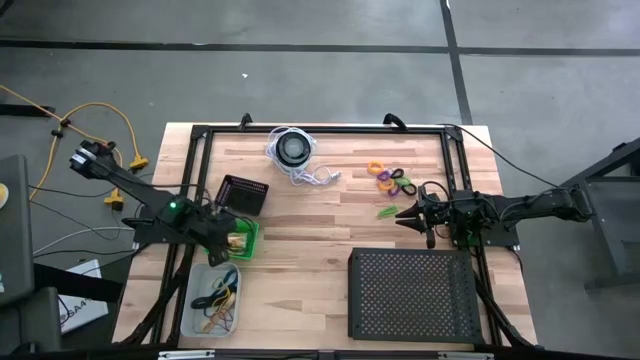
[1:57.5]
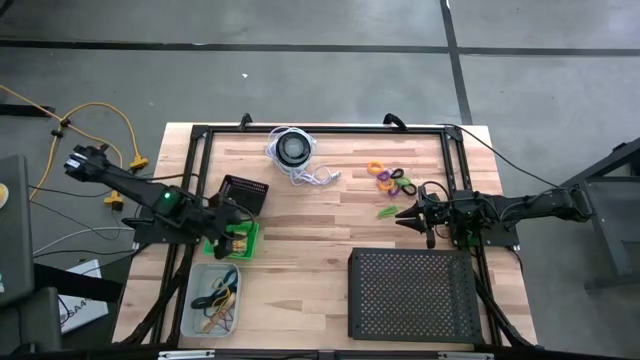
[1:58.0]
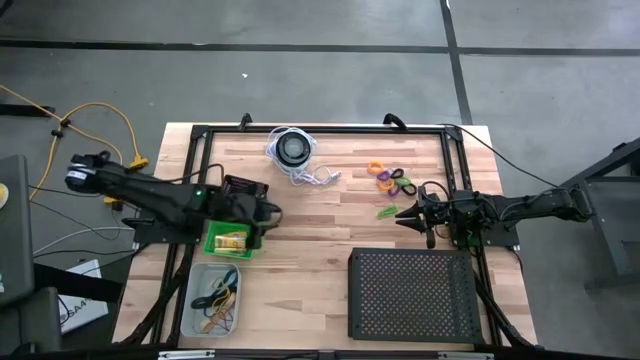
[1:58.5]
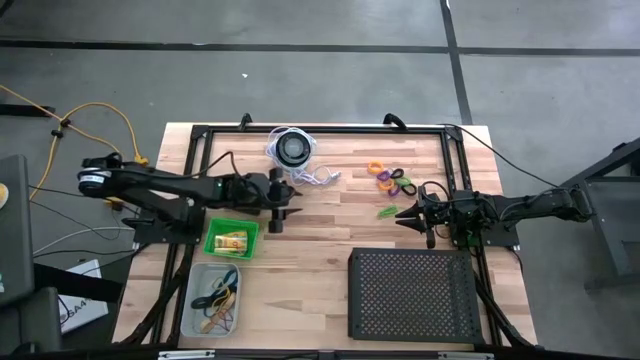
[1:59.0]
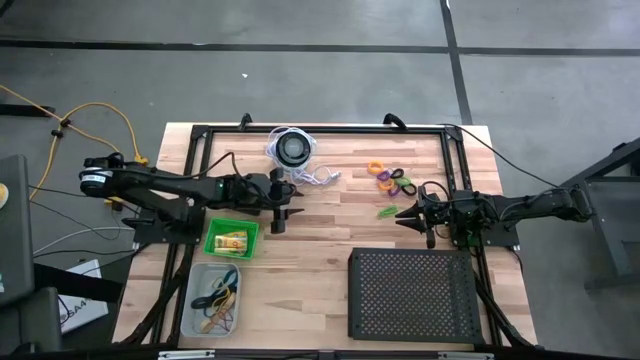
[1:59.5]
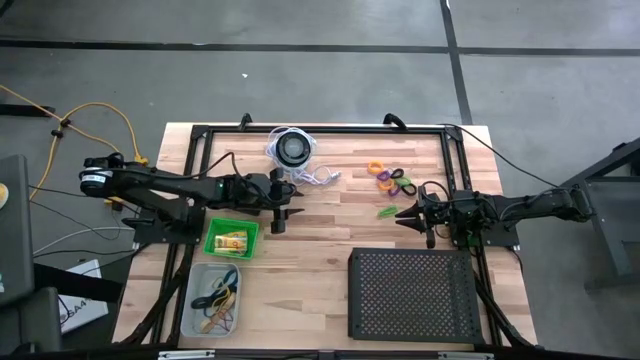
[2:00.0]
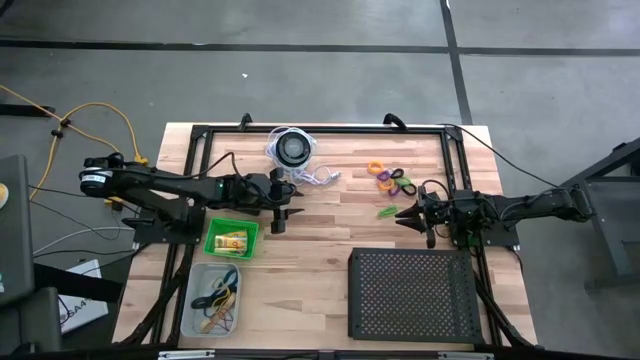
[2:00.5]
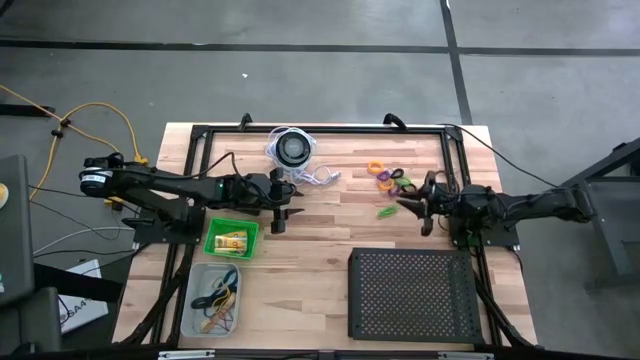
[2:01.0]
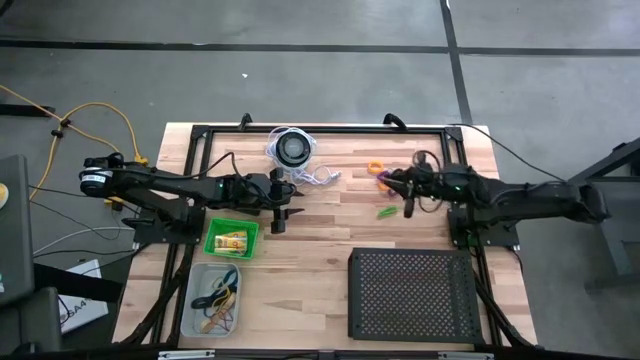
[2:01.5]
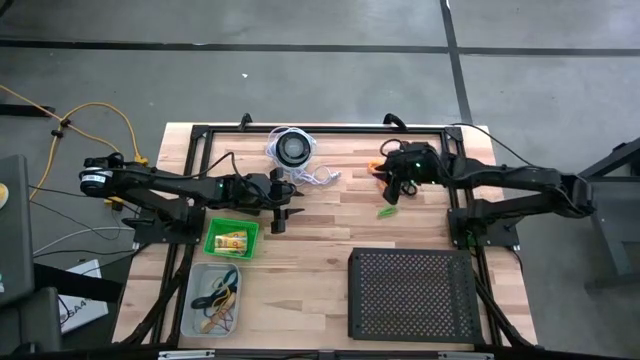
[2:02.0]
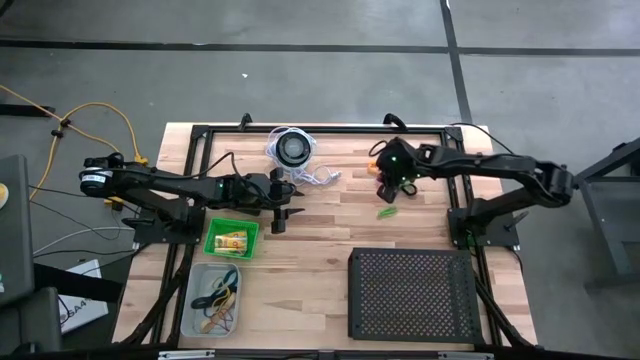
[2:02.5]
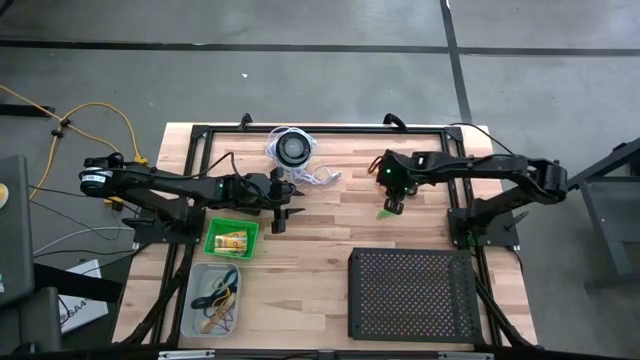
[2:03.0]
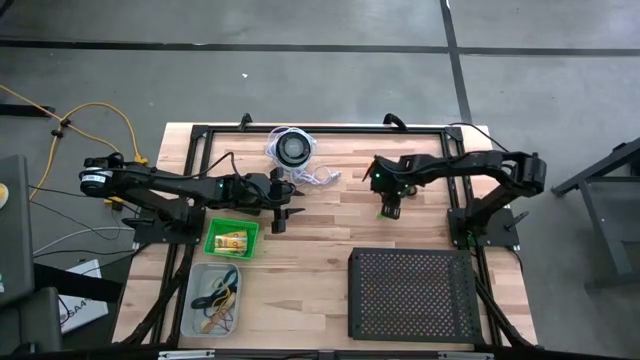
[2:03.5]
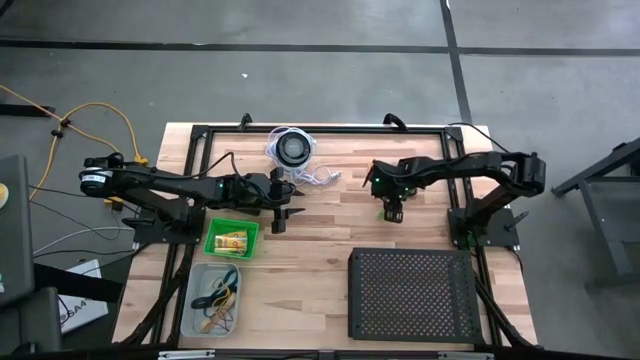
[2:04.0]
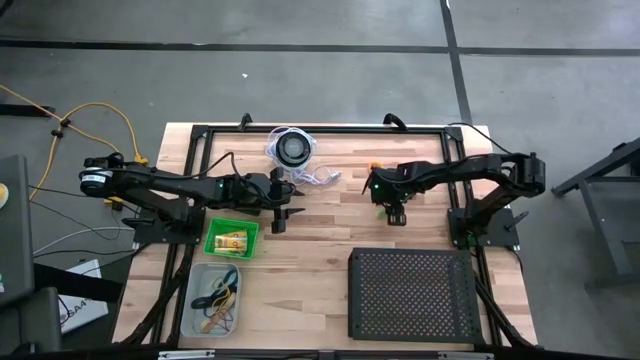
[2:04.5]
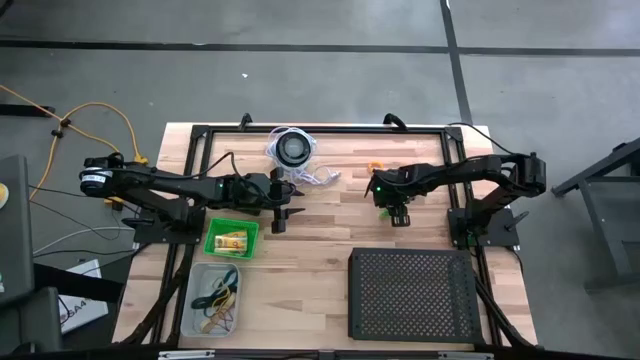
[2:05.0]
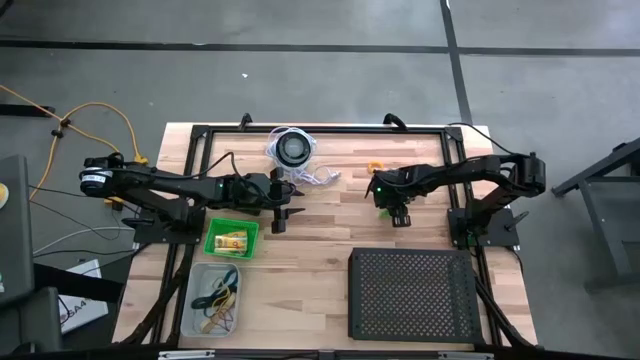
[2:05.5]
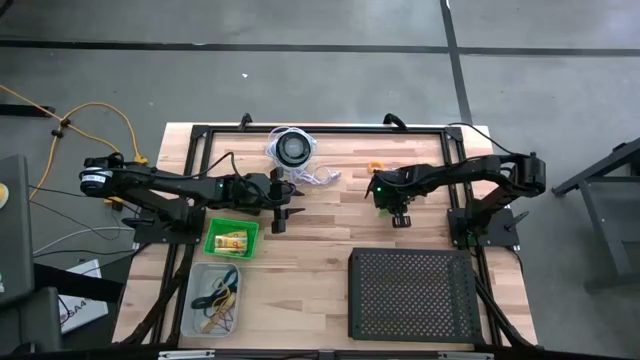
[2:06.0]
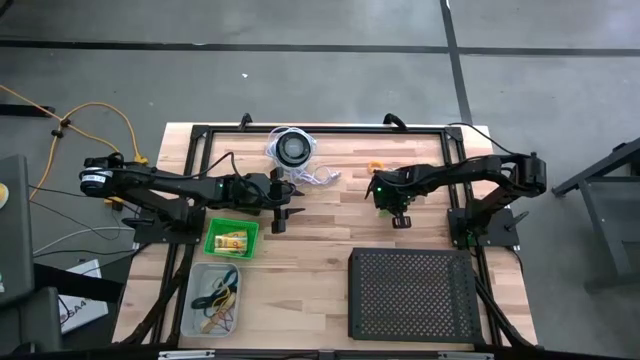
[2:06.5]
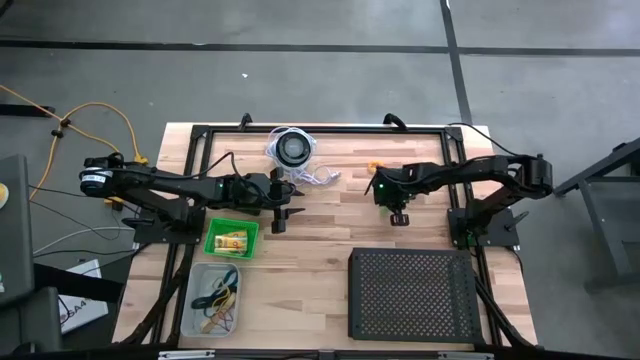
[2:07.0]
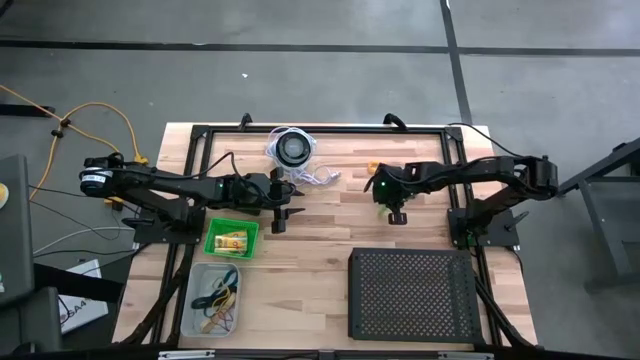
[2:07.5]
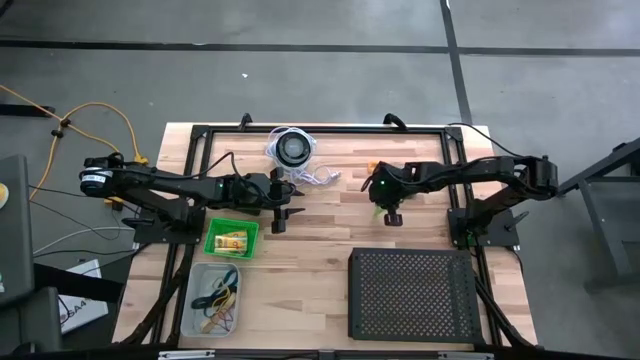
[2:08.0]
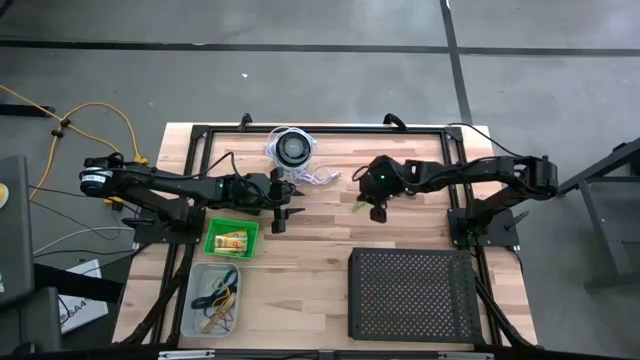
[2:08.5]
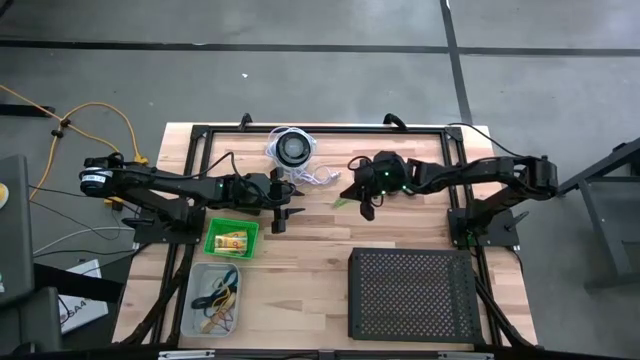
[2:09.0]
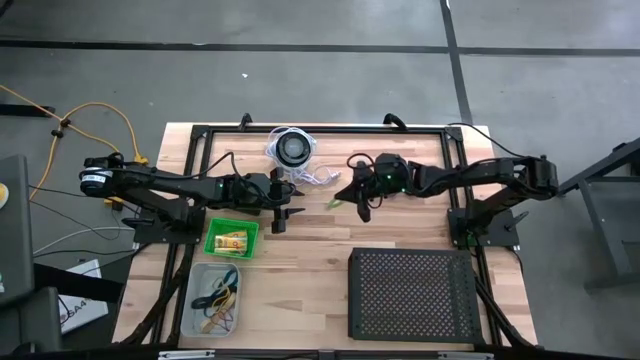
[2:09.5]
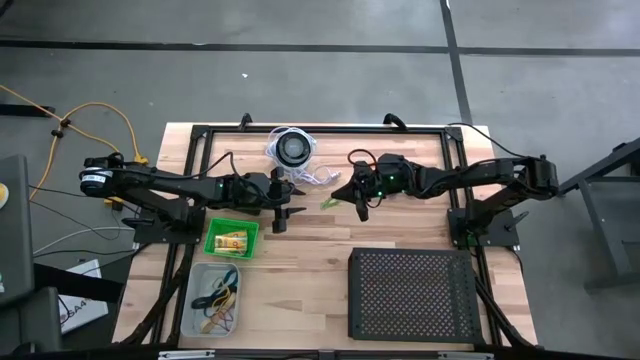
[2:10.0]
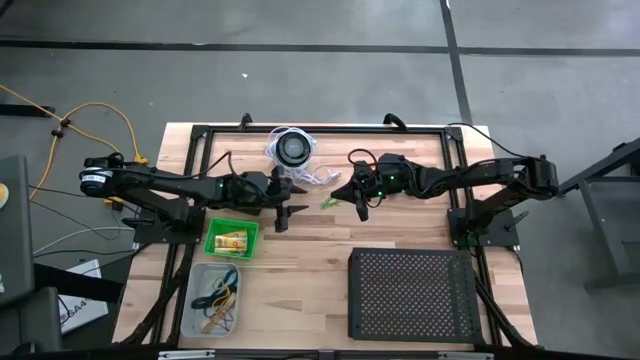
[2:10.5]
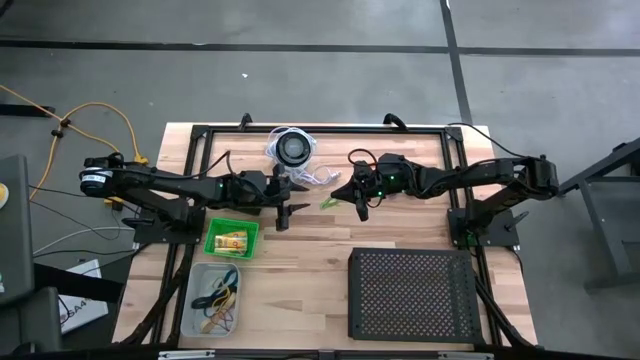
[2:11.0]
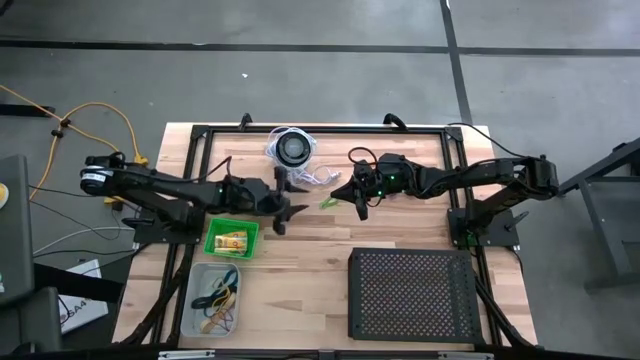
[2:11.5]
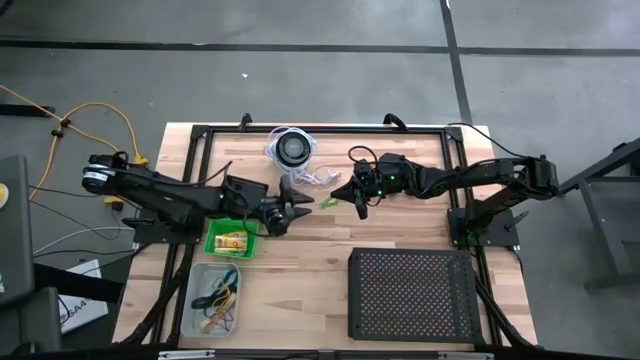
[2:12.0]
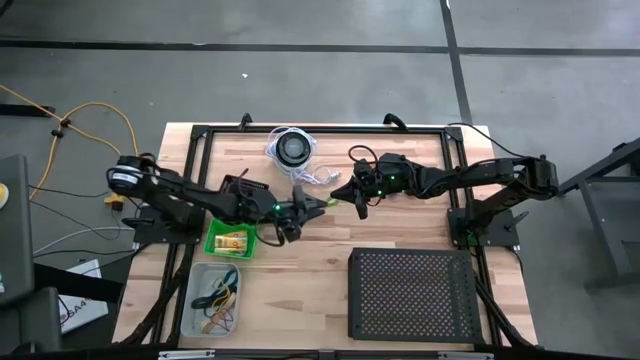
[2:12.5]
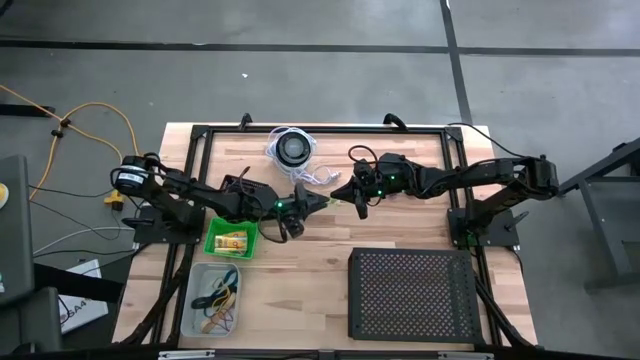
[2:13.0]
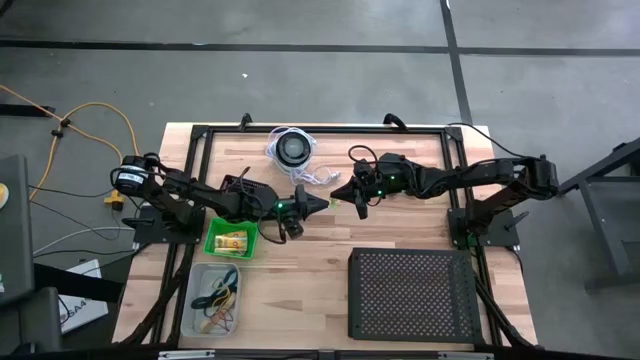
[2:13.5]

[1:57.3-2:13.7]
Task: Pick & Place Office Desk Supplies
Put the green coil keychain into the black bin

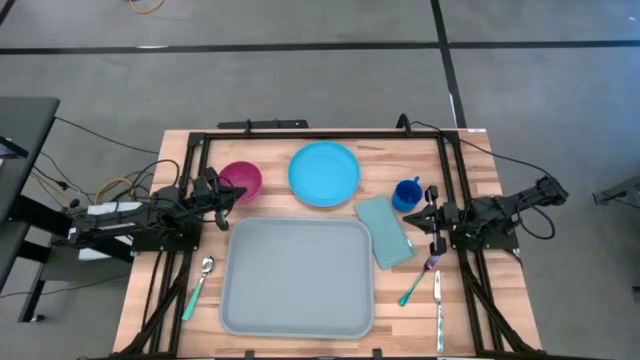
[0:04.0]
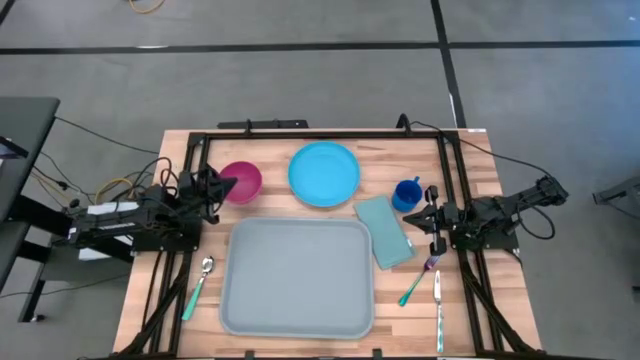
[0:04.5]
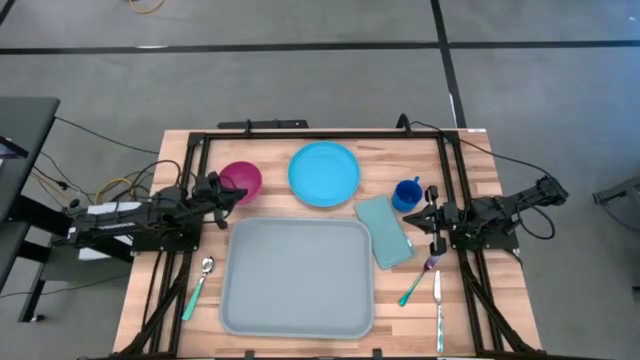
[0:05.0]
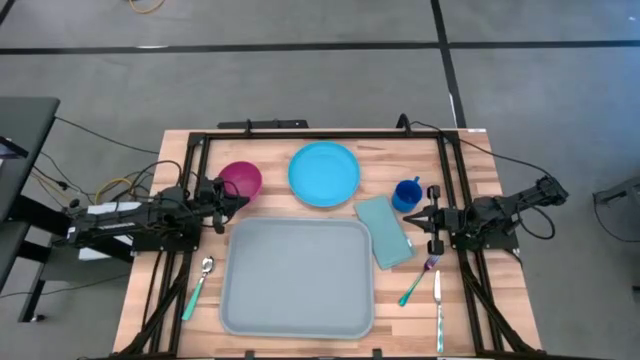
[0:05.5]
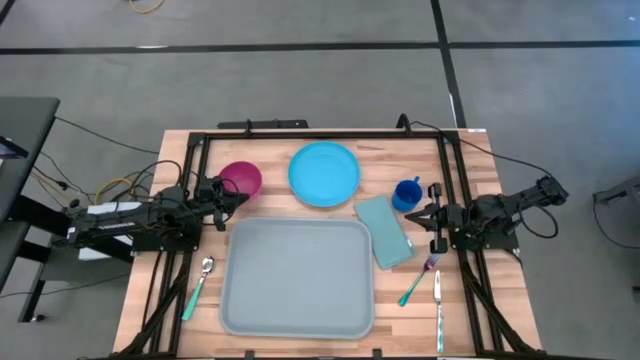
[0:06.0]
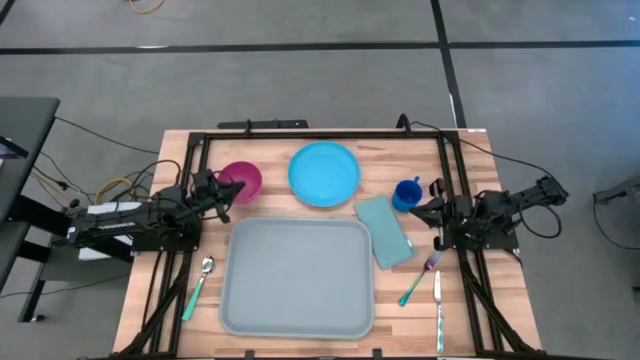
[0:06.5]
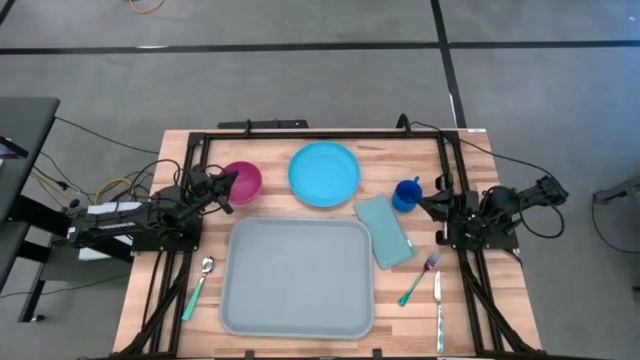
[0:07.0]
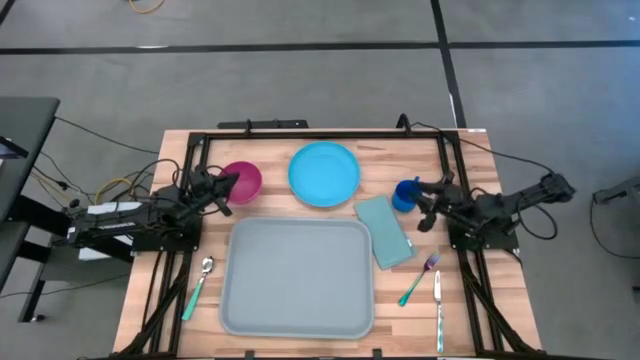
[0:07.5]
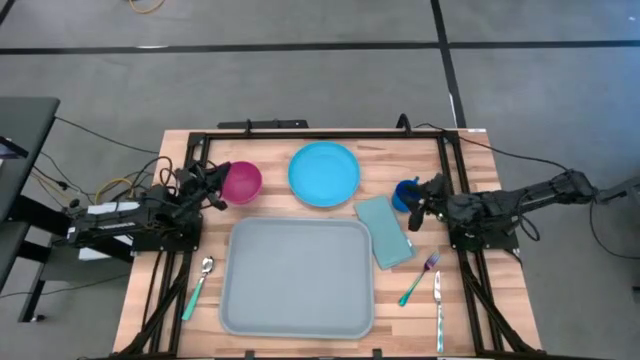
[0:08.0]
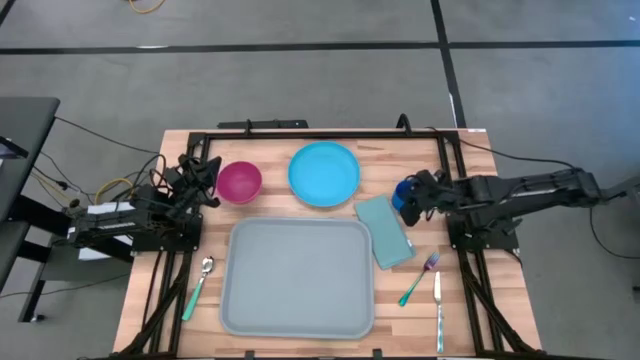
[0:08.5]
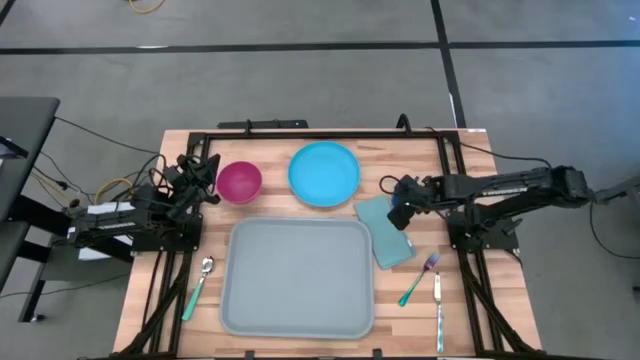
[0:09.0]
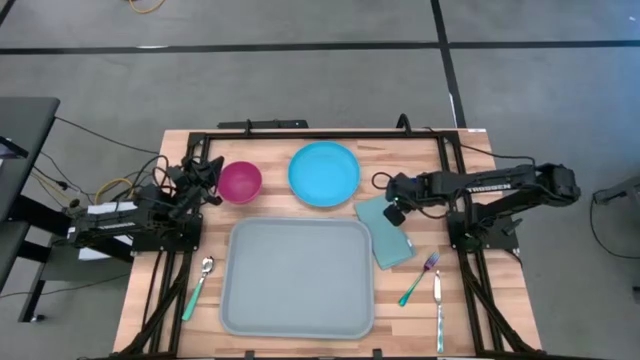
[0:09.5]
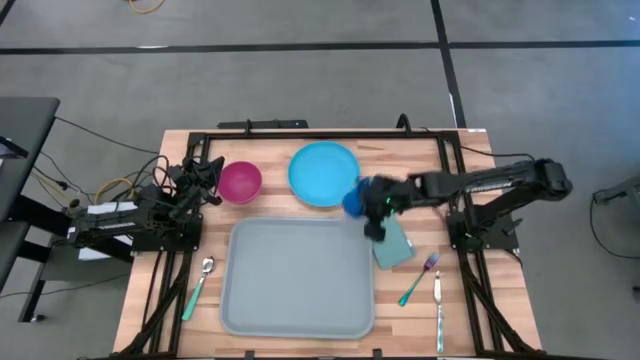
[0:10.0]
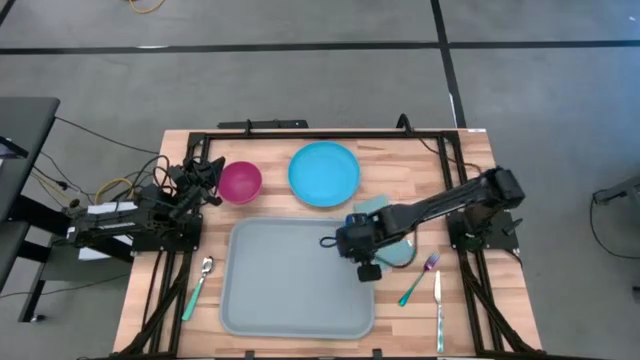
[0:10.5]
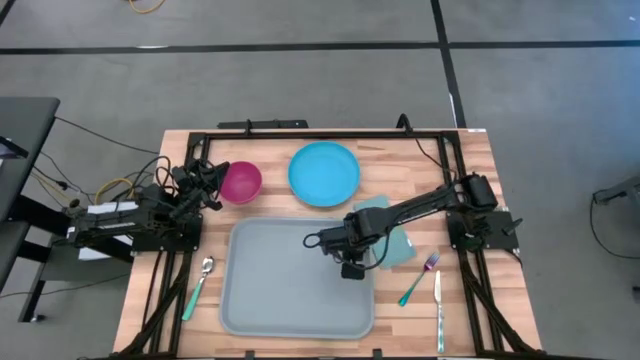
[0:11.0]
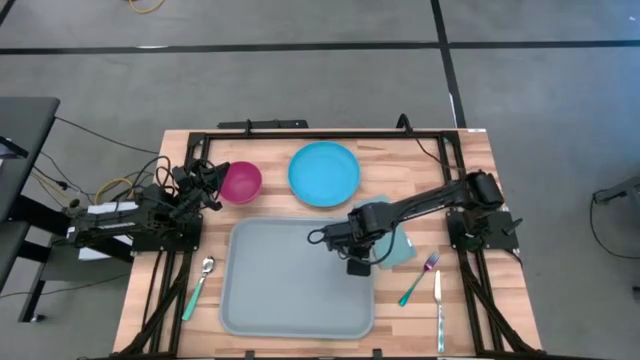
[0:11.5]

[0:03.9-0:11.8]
Task: Set up tray
Put the blue mug on the gray tray
